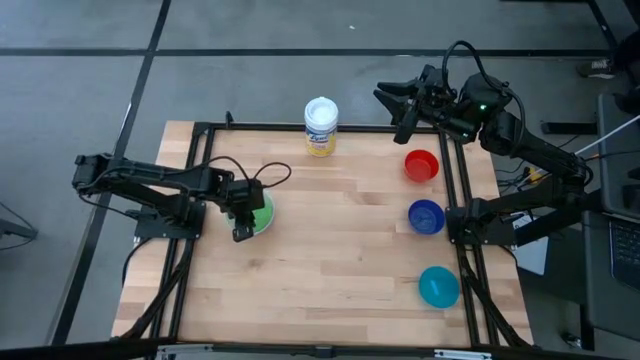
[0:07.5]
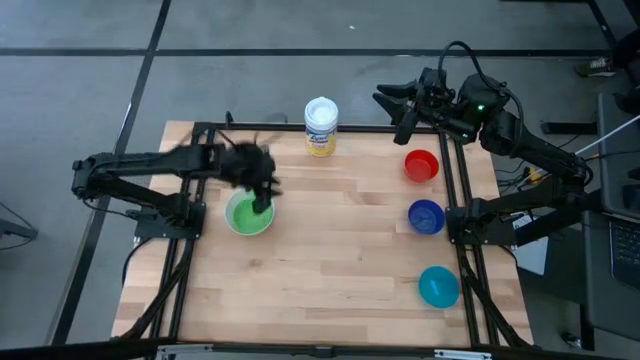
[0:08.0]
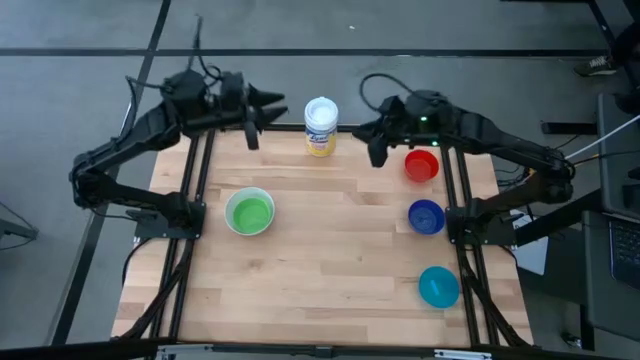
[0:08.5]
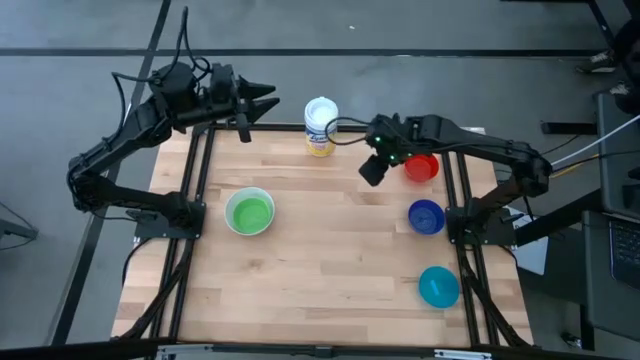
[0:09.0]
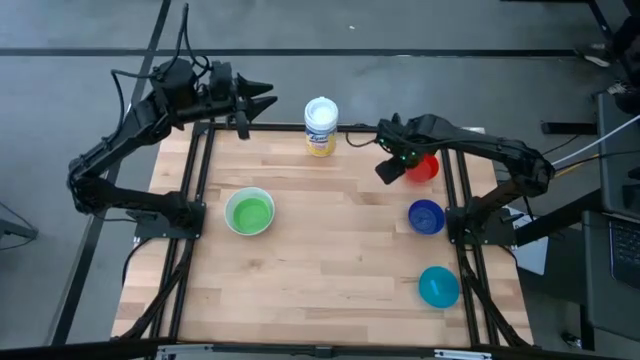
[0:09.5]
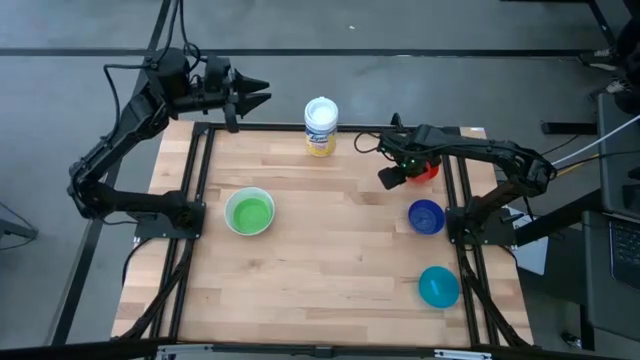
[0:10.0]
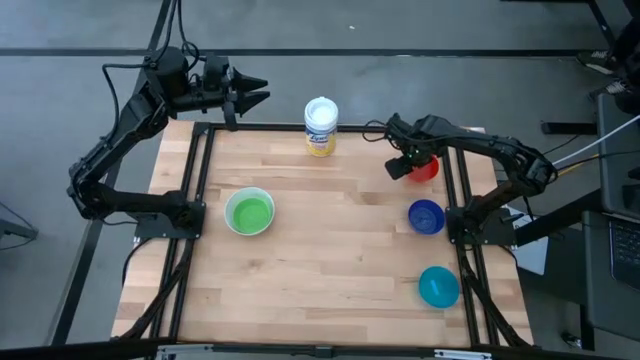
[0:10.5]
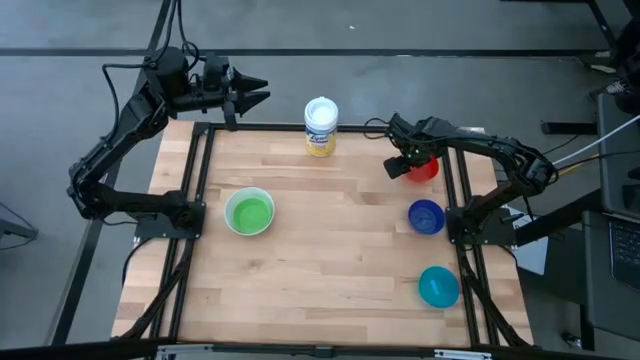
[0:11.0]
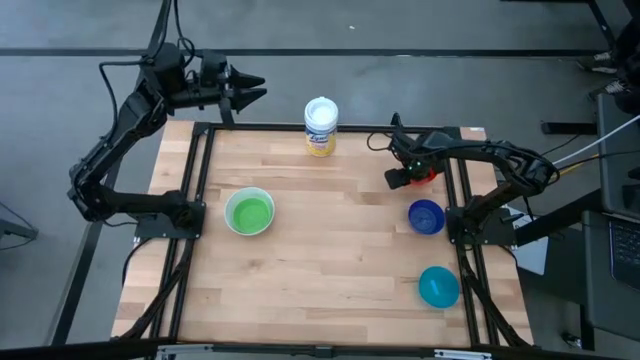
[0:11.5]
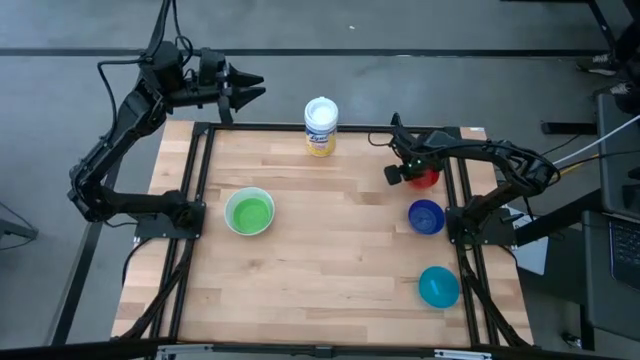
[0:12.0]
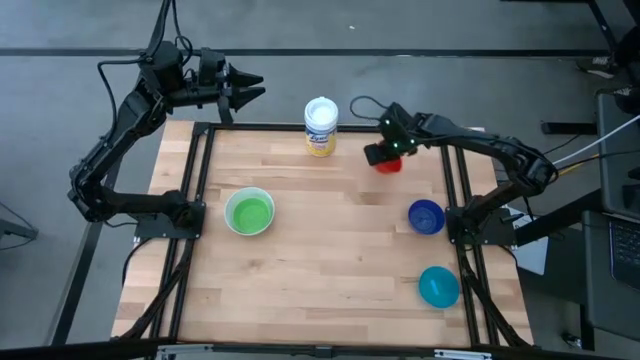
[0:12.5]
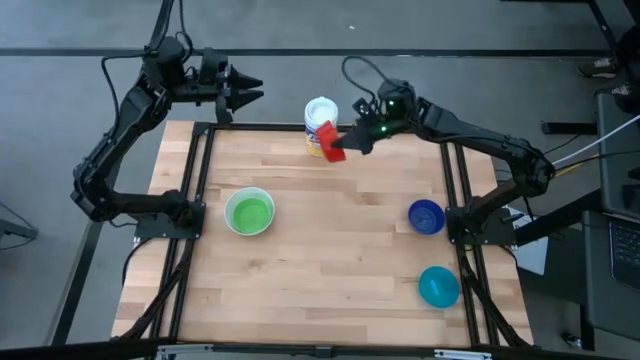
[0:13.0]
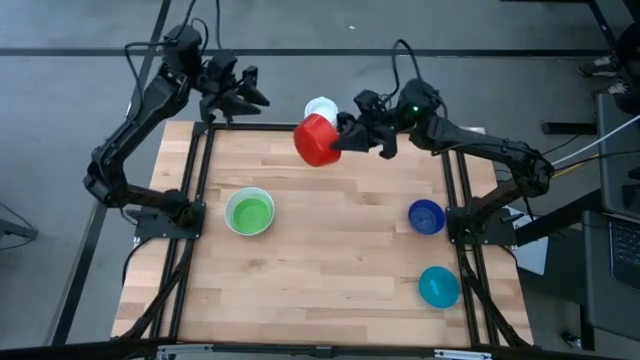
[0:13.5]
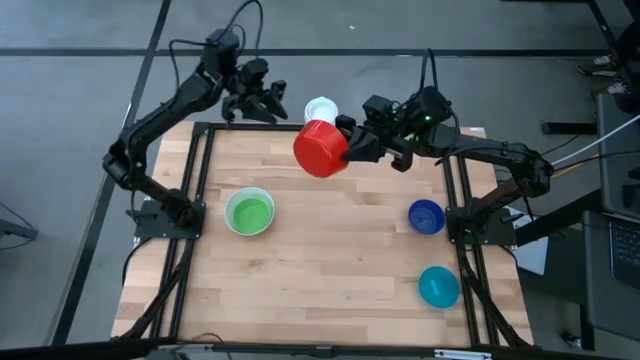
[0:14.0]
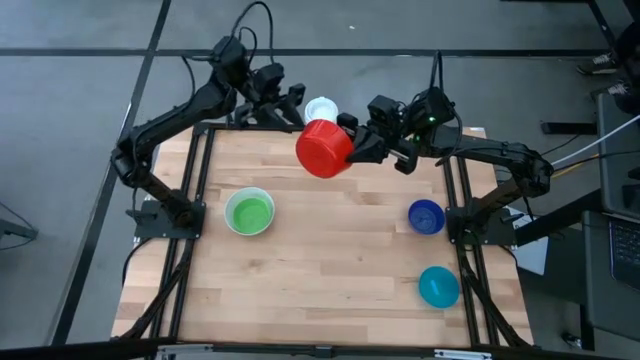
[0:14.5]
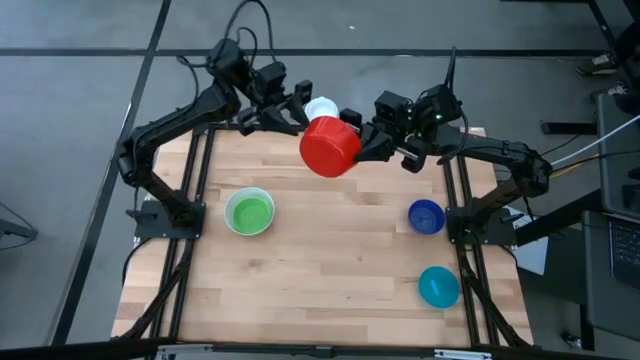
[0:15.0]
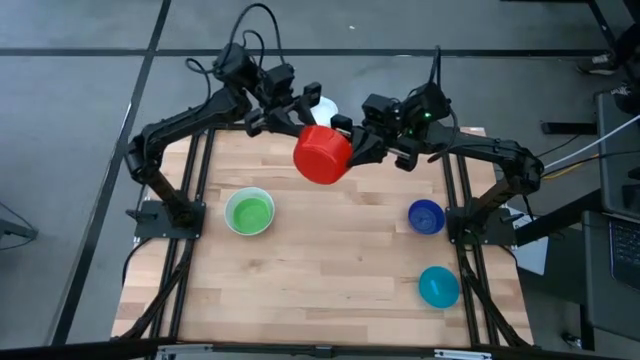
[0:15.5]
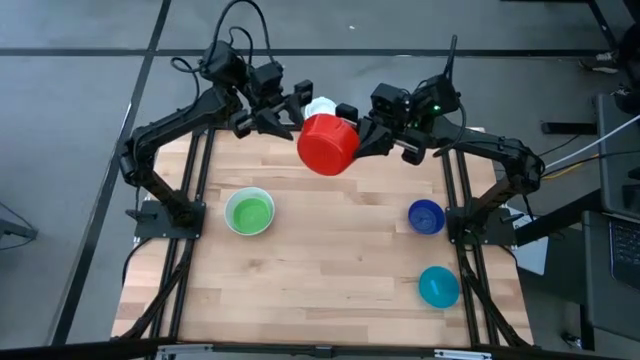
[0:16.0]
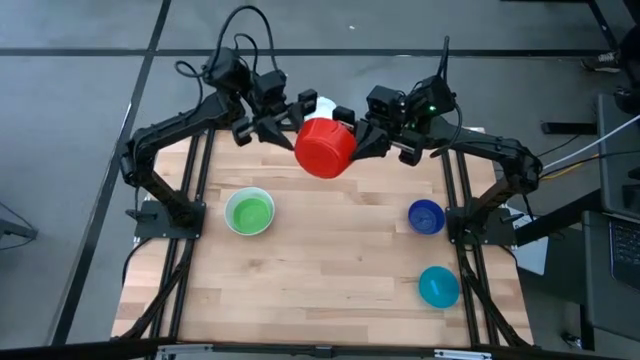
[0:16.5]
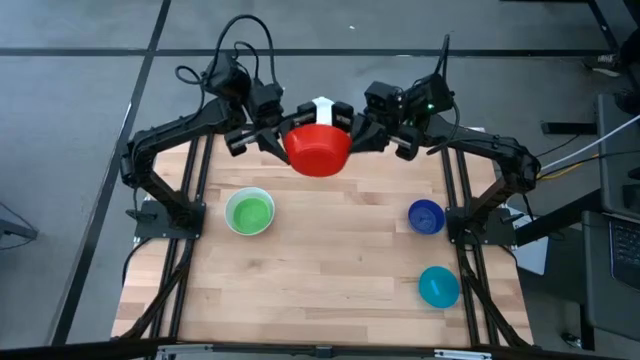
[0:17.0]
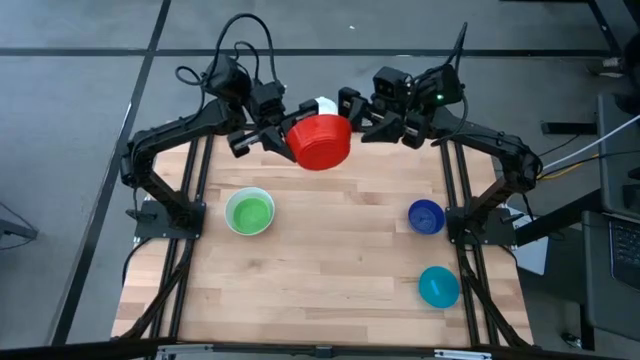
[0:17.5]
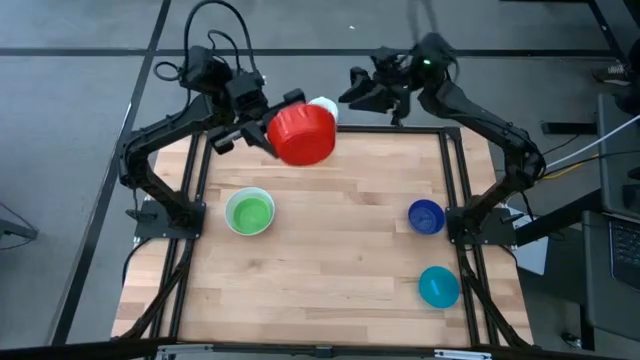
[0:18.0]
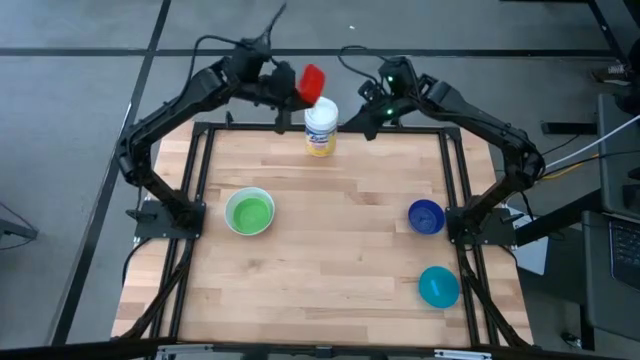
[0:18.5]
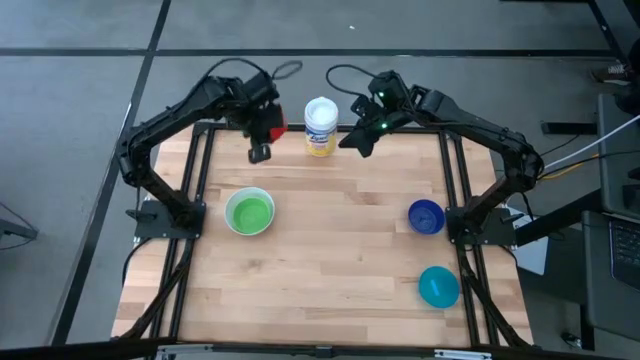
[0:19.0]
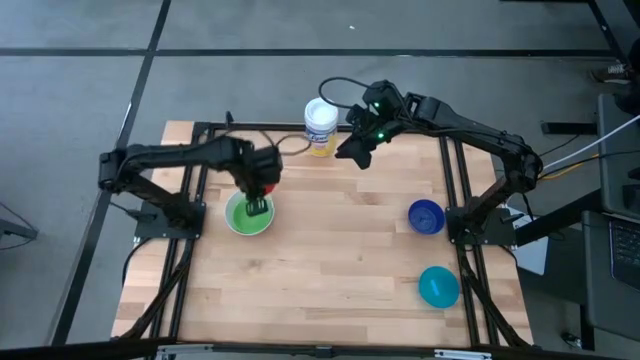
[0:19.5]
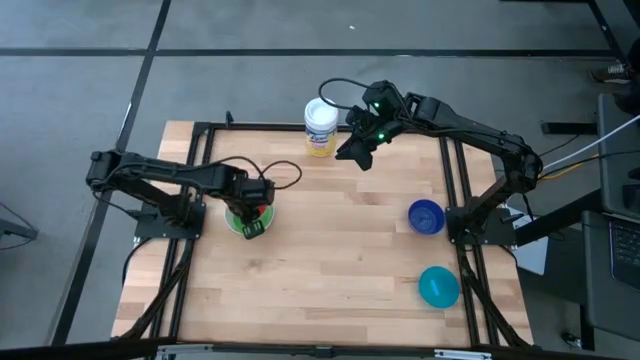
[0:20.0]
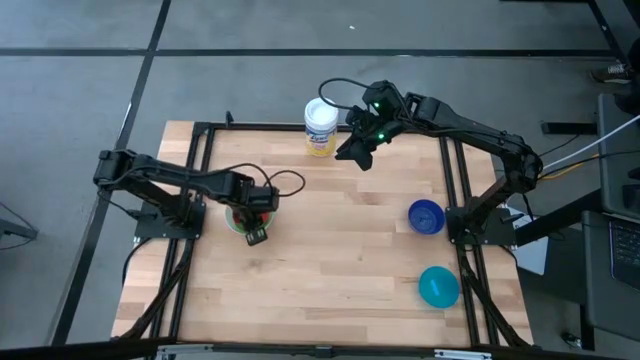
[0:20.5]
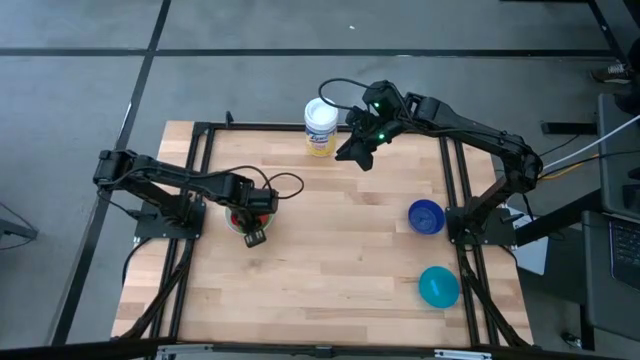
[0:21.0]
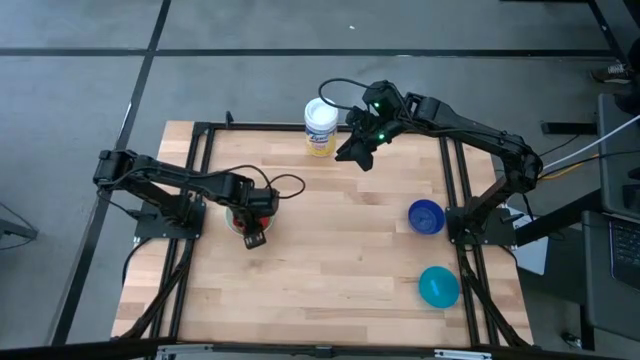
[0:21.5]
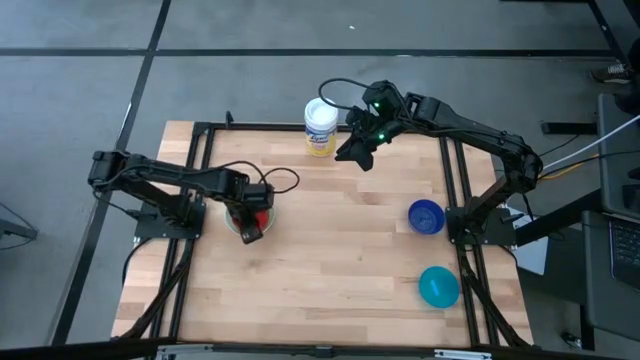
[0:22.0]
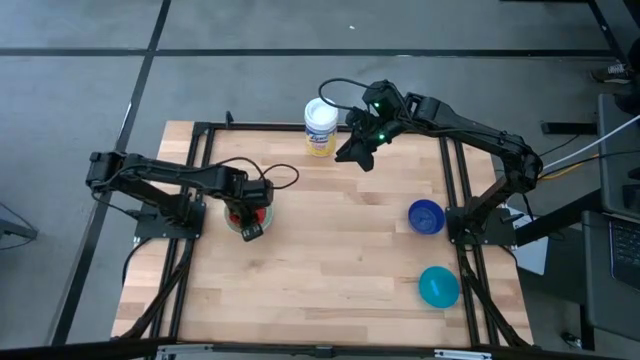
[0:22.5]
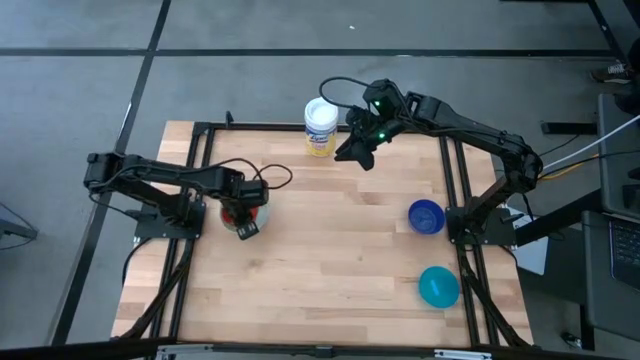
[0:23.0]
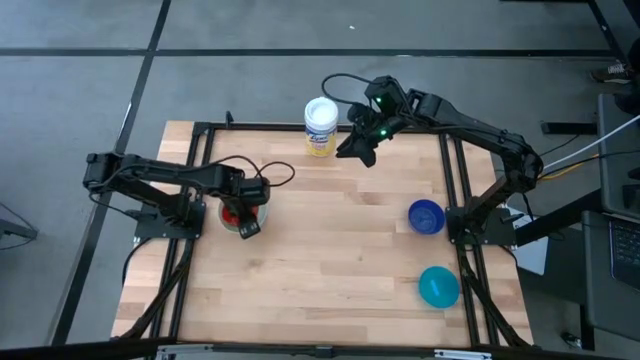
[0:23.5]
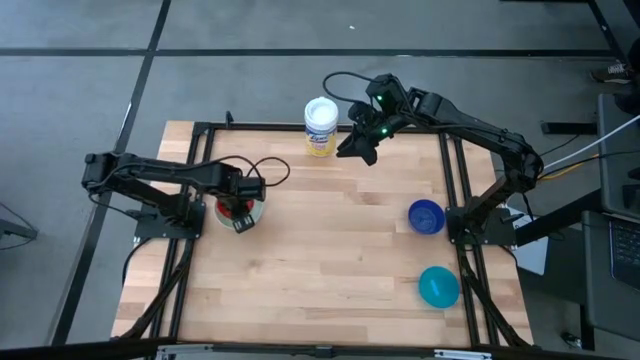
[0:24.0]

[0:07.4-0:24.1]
Stack the red bowl on top of the green bowl on the table

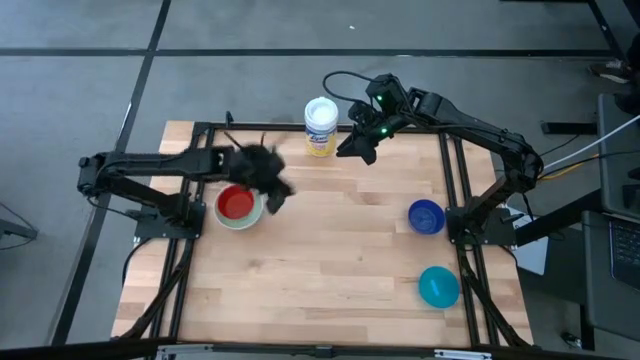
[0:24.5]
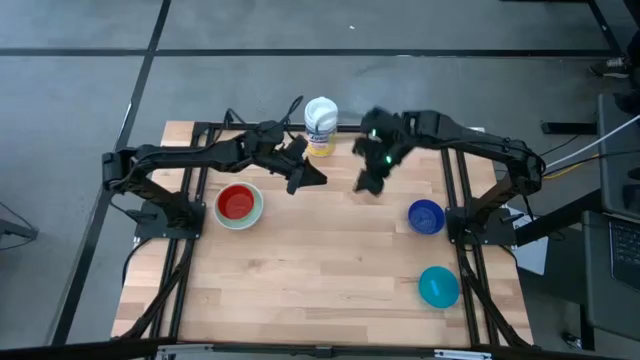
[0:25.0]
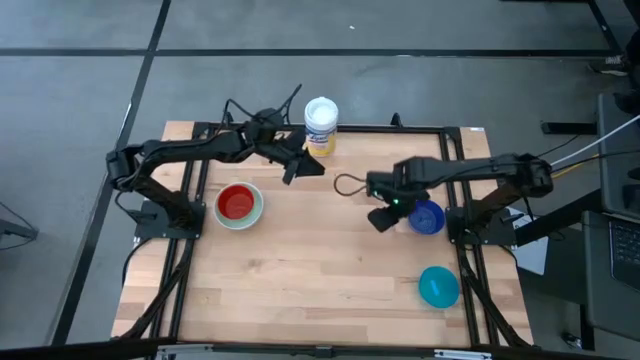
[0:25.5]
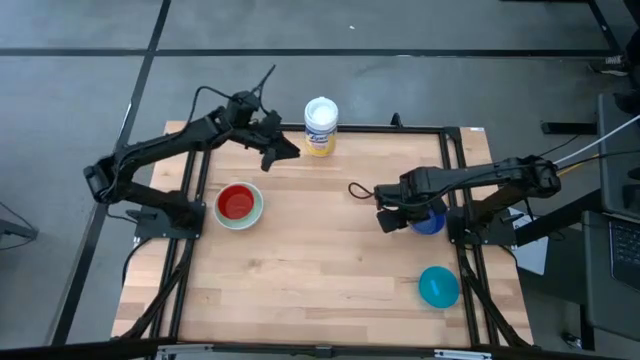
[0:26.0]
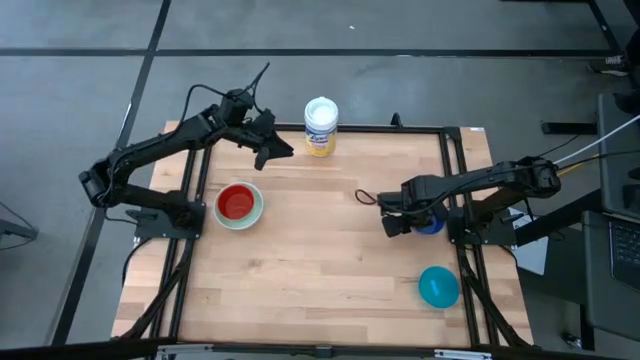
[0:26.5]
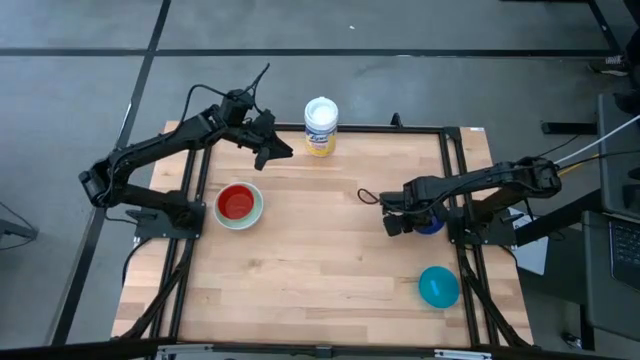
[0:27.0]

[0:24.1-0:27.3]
Stack the blue bowl on top of the red bowl on the table
